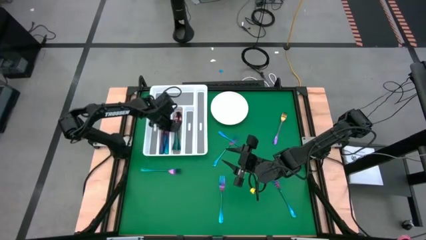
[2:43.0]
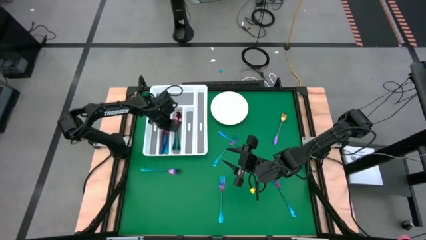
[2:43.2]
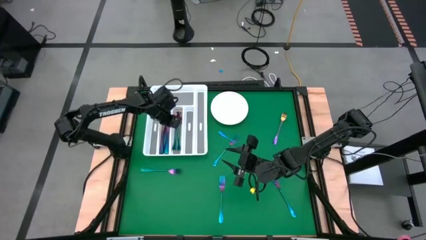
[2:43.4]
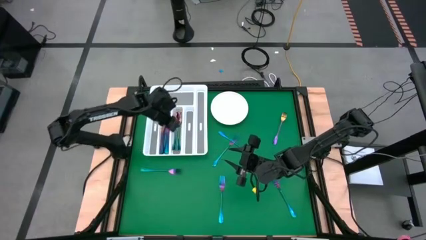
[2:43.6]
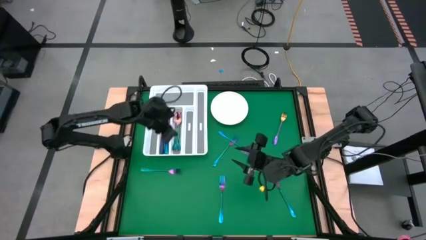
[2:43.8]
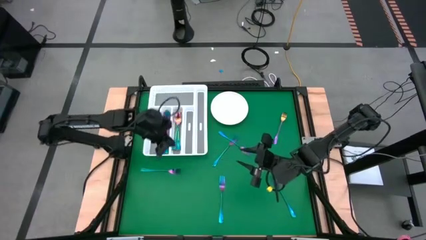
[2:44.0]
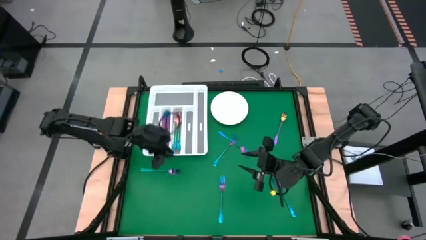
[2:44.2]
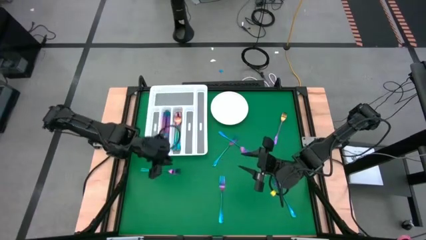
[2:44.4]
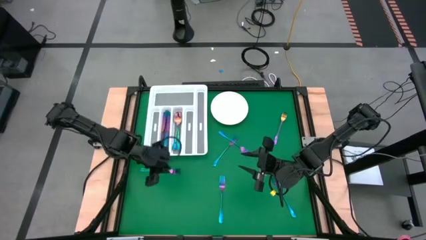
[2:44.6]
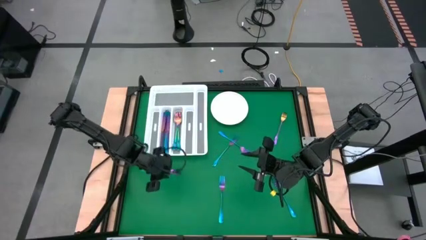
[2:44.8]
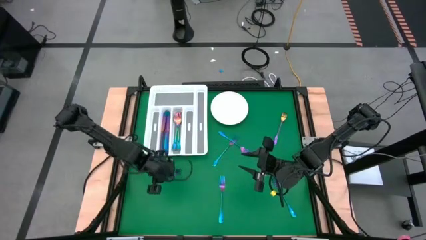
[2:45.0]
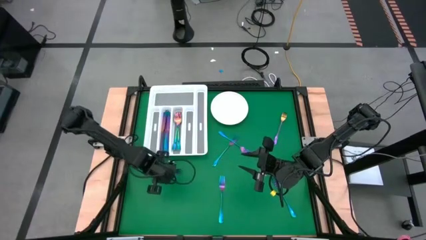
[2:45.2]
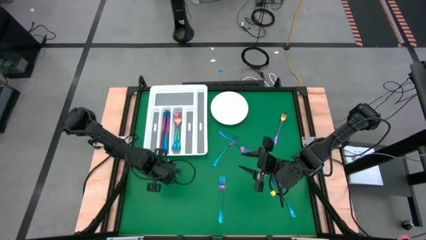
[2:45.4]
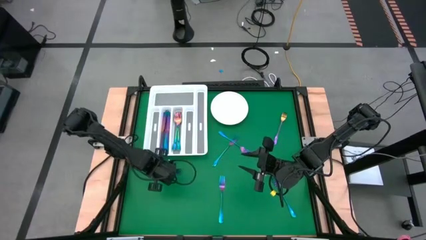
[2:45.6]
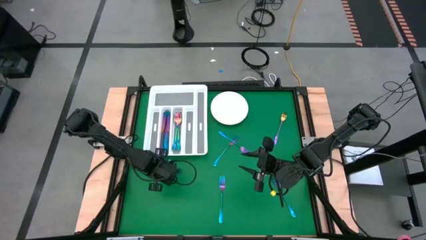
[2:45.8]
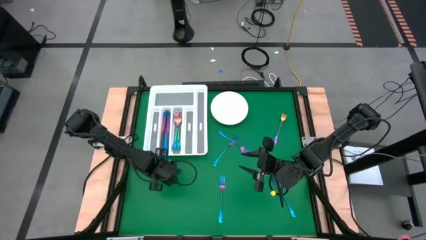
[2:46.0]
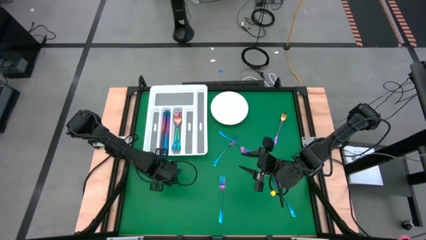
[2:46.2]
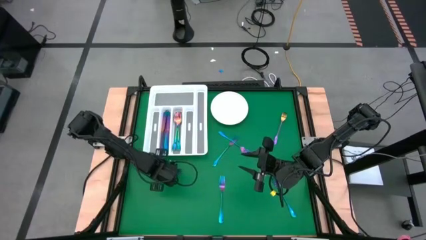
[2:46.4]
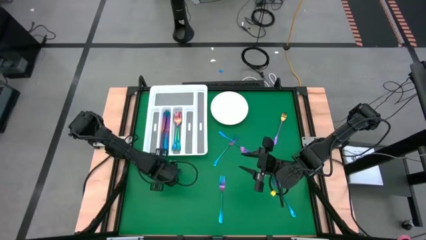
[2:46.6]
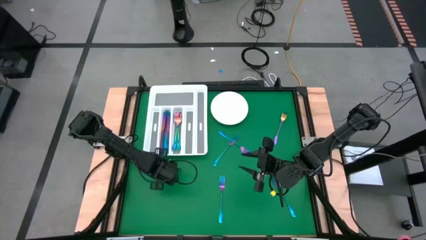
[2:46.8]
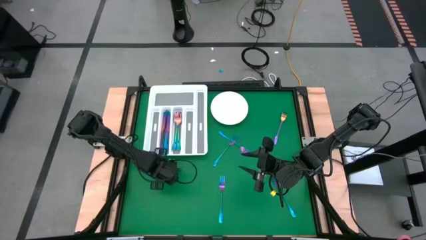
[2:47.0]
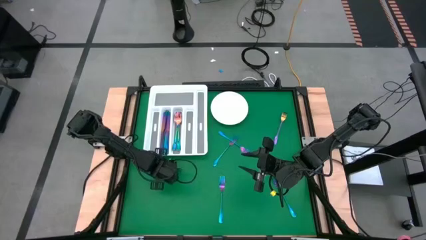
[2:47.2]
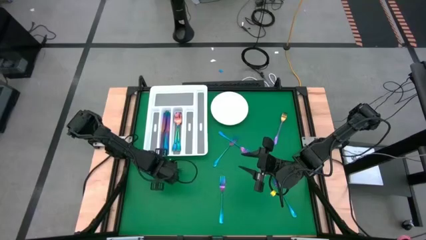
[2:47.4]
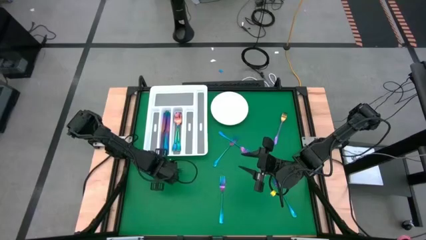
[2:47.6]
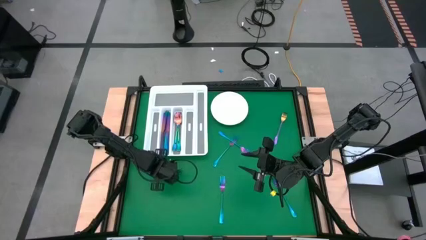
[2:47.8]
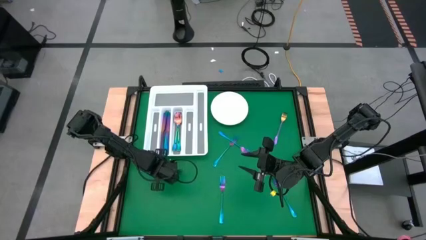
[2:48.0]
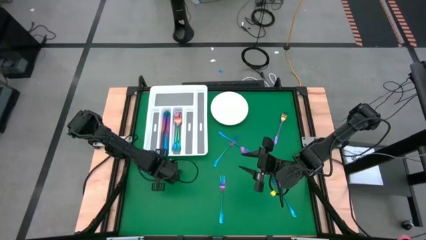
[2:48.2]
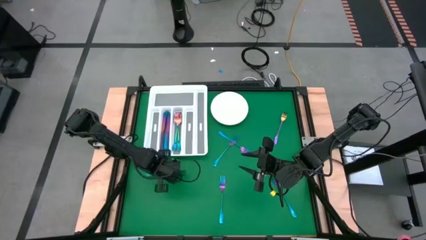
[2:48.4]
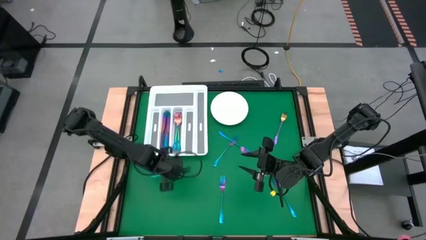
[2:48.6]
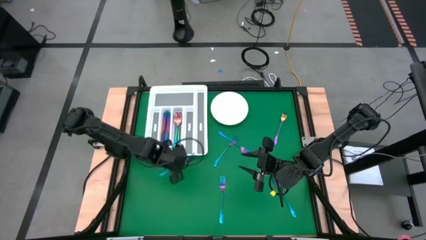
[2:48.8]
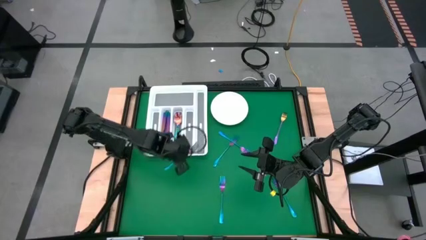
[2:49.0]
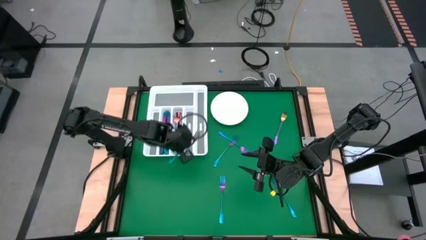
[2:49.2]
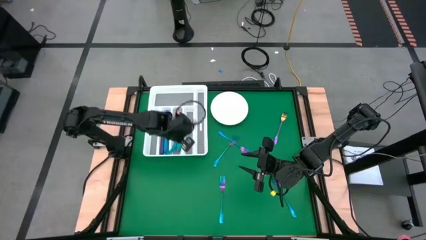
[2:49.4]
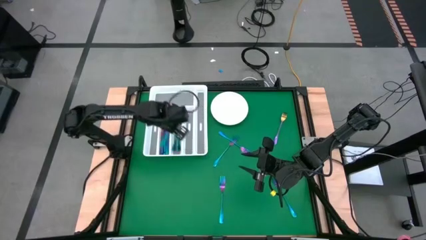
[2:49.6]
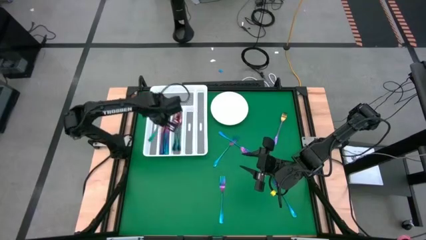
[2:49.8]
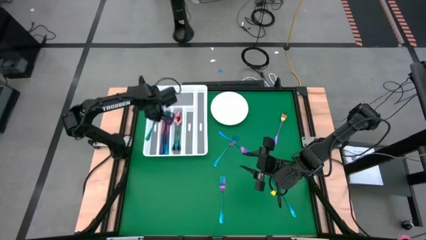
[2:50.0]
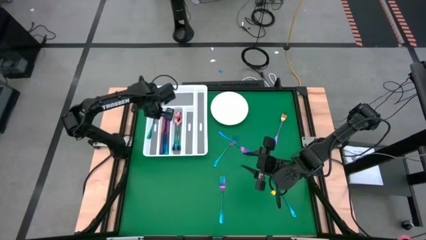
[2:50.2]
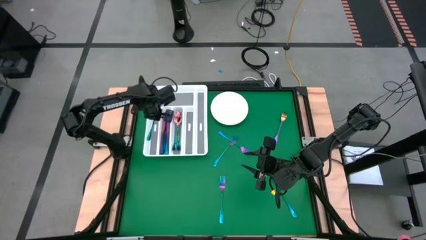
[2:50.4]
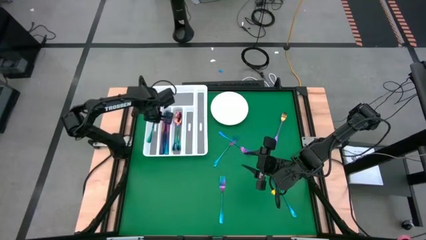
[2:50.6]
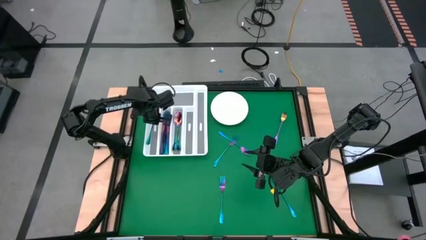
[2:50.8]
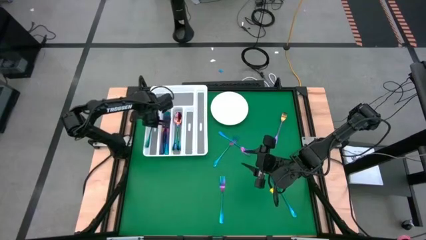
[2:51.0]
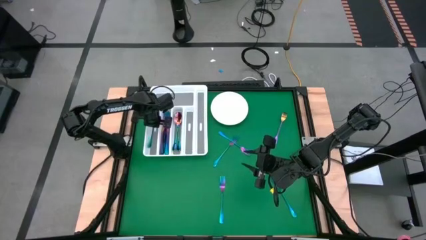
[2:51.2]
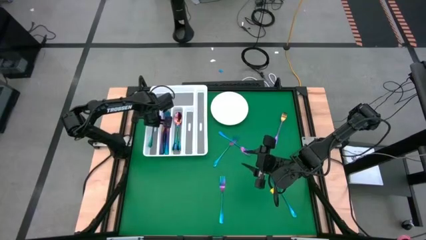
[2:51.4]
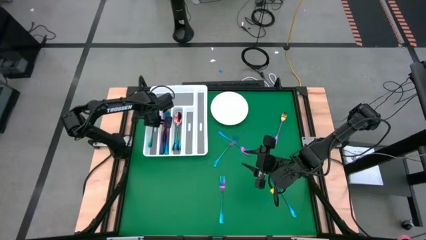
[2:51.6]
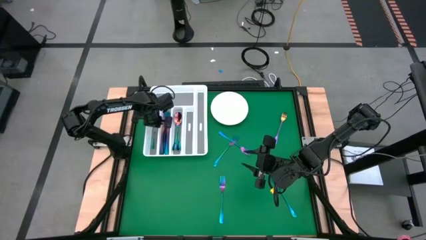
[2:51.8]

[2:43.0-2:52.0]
Task: Sort silverware
Put the blue fork into the silverware tray

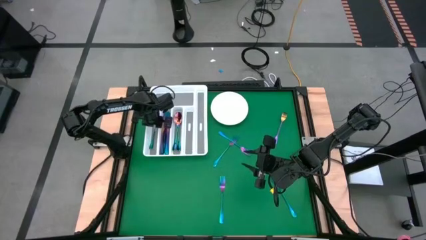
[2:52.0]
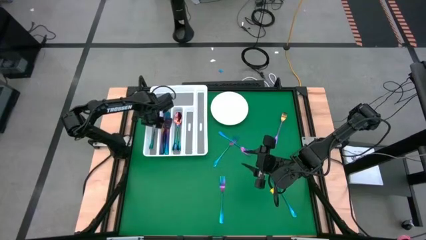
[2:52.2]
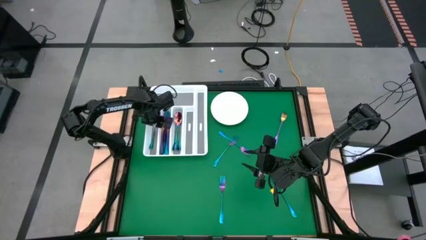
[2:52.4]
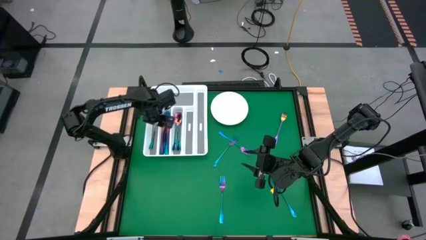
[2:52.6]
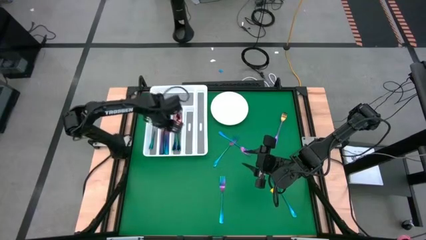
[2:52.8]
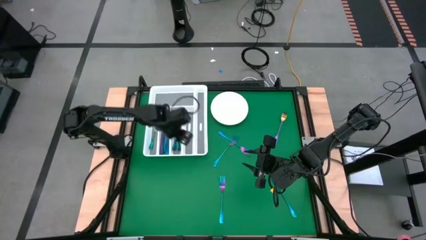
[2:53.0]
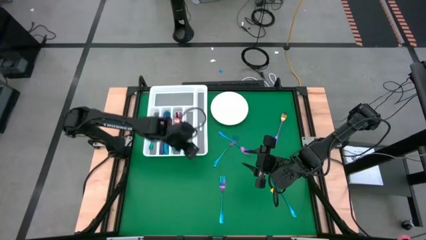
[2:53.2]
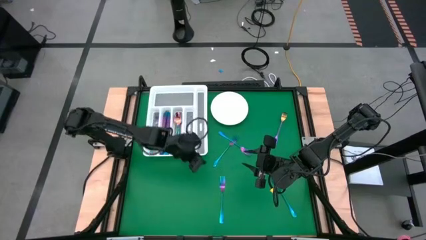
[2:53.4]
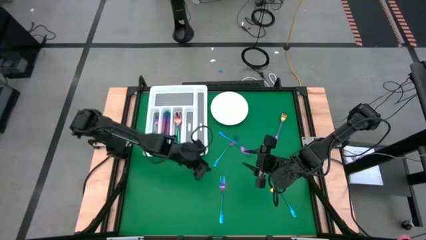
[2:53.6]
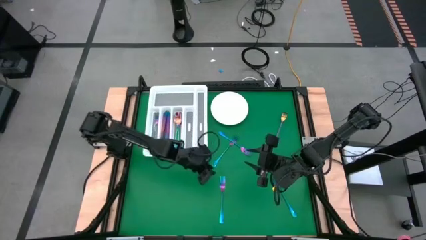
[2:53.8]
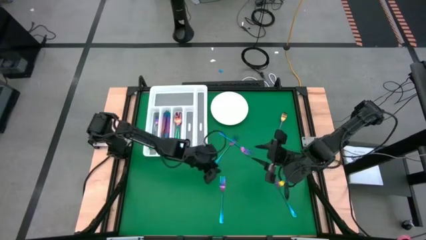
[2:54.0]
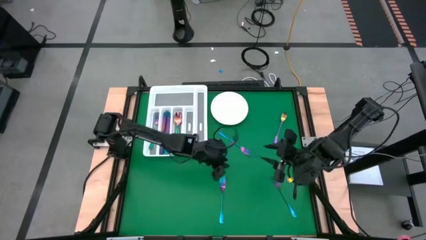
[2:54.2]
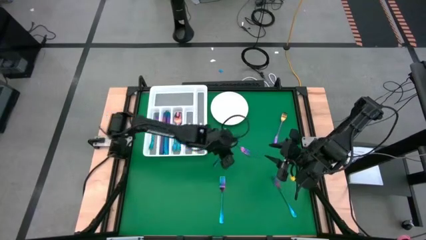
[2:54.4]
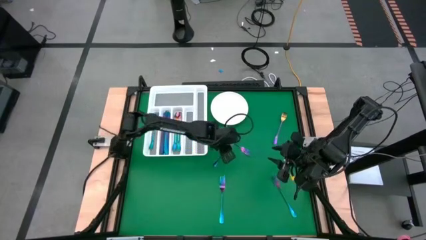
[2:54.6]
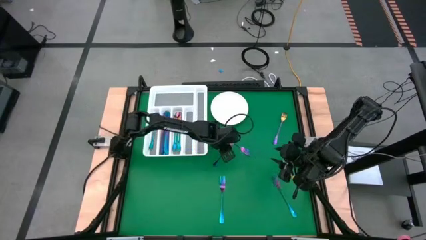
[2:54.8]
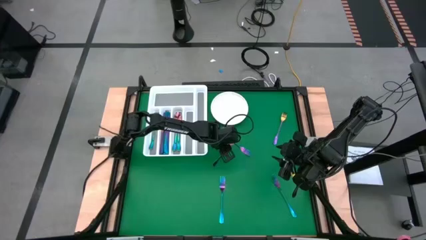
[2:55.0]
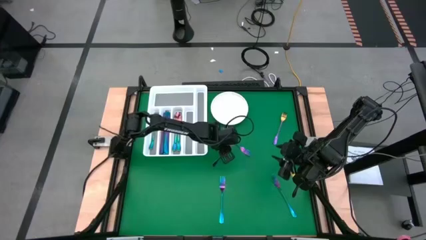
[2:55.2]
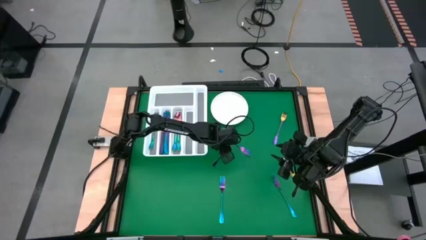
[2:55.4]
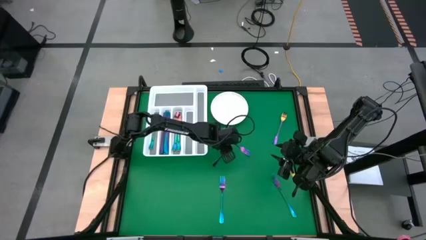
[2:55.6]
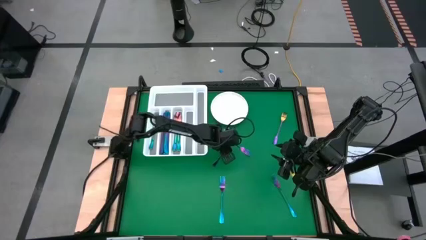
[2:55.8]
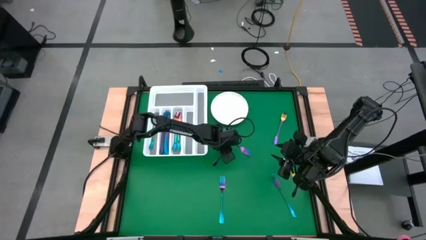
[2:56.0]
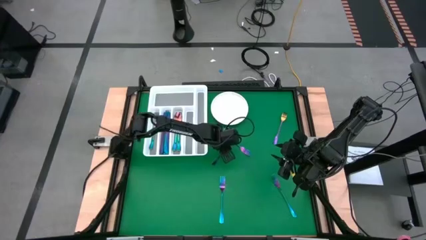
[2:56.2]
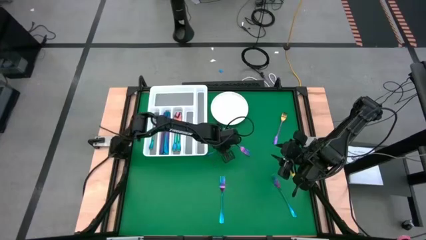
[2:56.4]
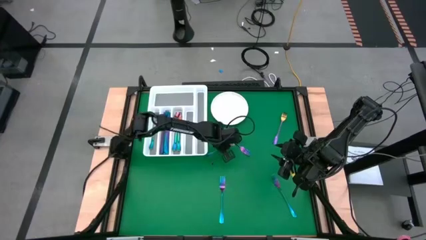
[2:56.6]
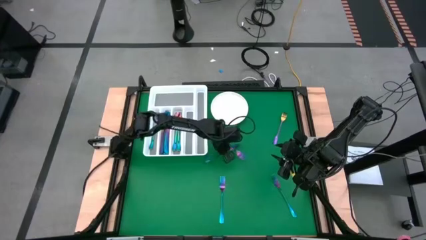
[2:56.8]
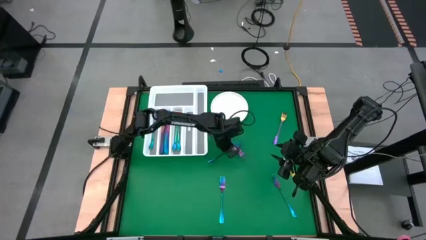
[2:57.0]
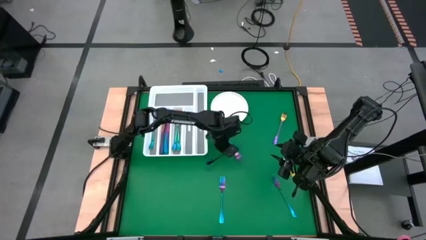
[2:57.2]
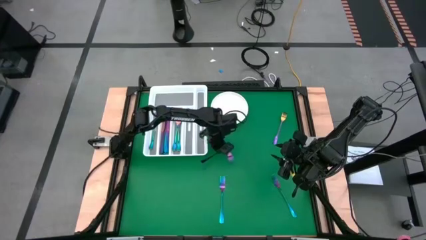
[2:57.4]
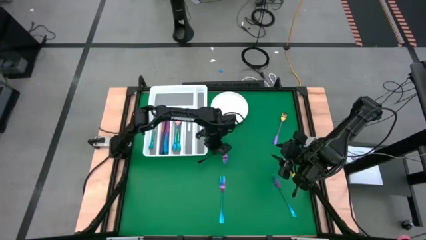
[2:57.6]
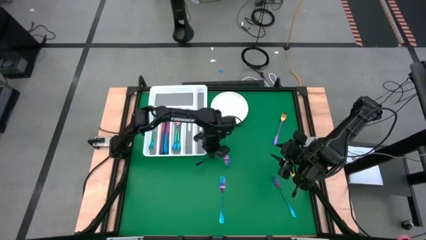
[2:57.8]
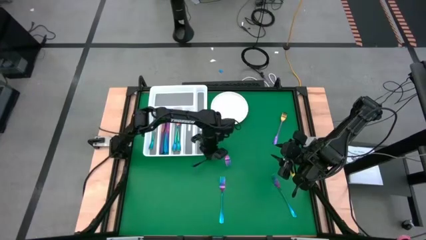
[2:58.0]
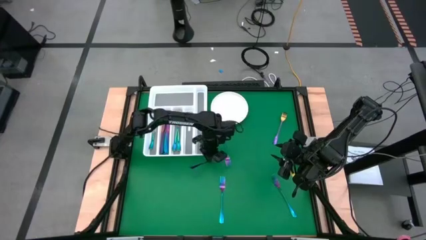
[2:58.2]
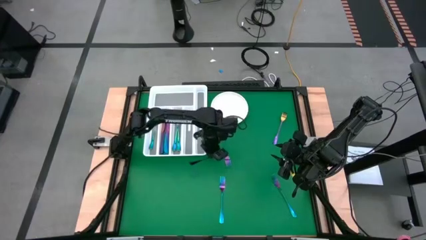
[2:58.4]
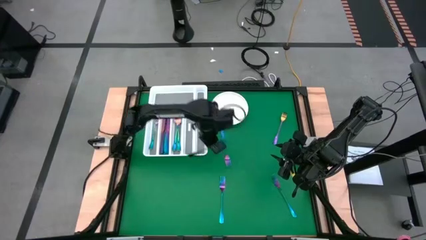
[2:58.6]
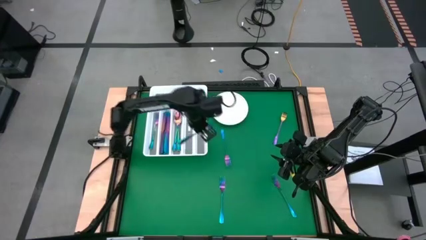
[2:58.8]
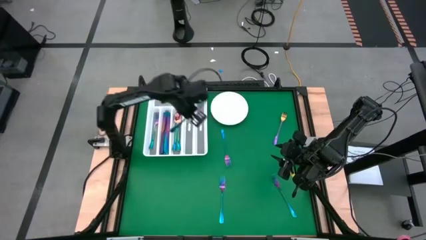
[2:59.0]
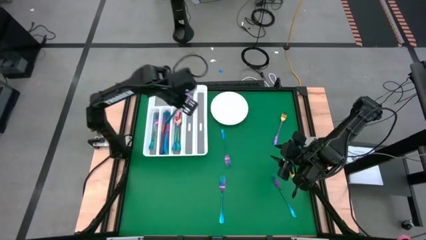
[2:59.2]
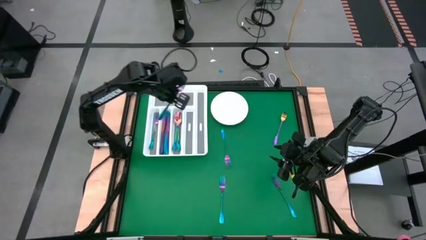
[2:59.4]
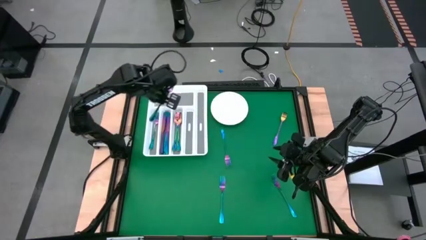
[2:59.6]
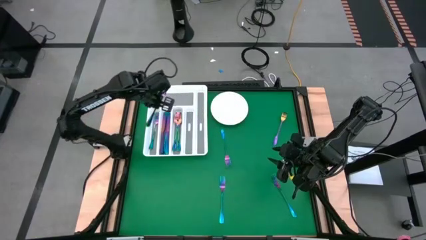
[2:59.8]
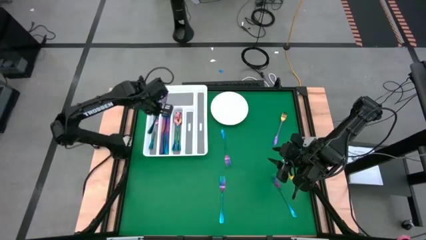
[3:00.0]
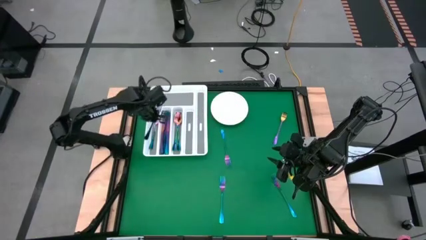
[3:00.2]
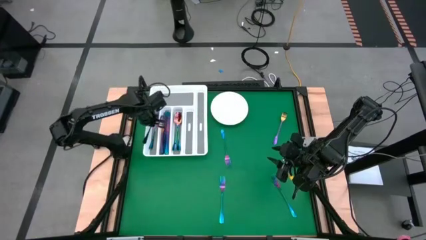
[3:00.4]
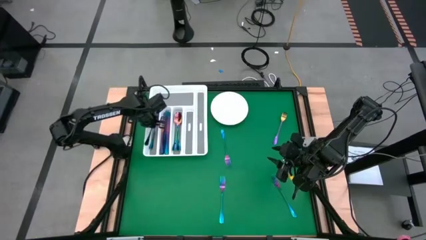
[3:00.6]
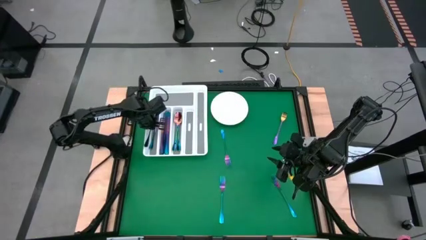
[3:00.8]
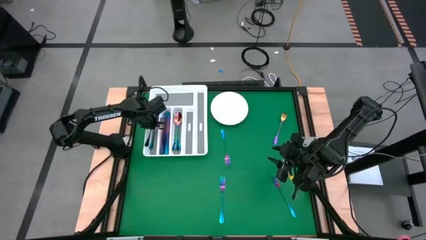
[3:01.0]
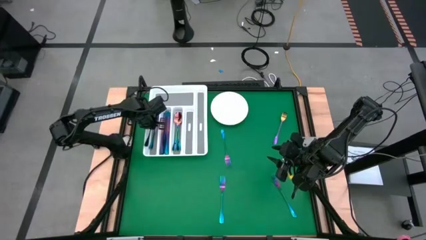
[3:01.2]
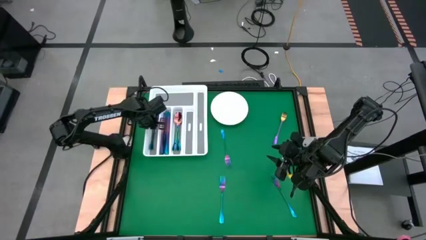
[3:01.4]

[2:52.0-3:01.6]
Put the blue fork into the silverware tray
